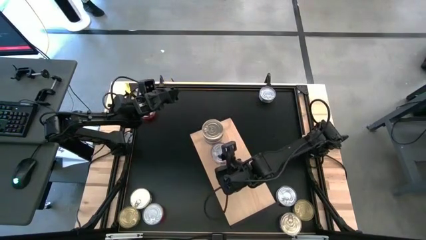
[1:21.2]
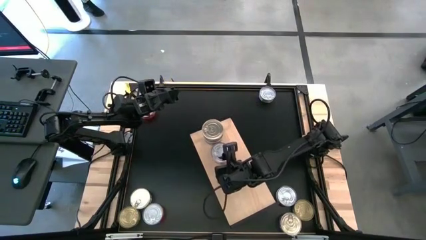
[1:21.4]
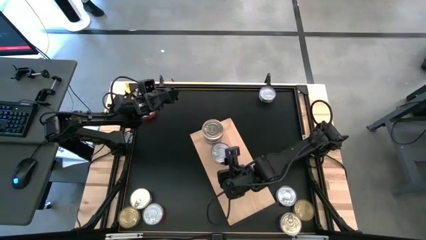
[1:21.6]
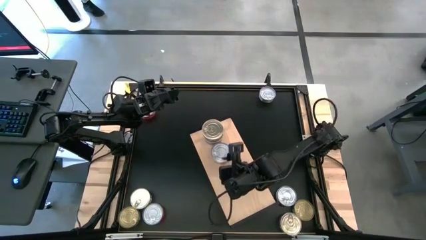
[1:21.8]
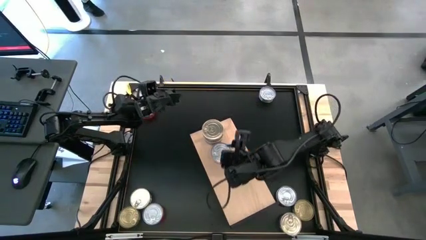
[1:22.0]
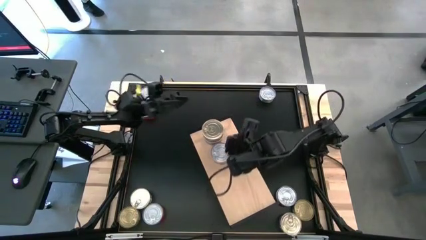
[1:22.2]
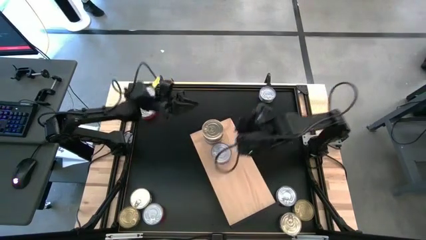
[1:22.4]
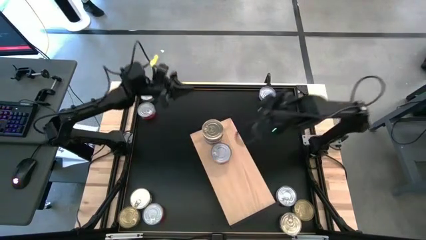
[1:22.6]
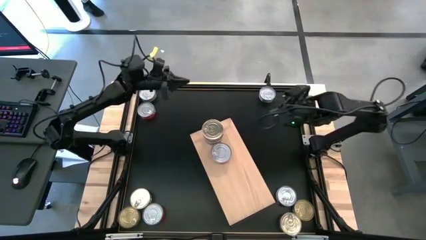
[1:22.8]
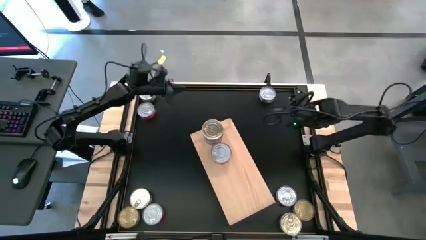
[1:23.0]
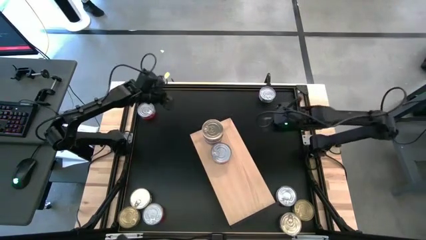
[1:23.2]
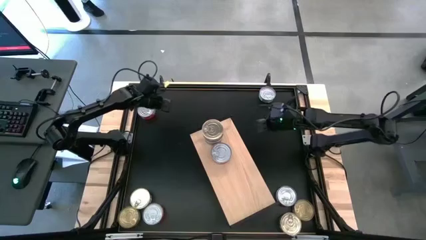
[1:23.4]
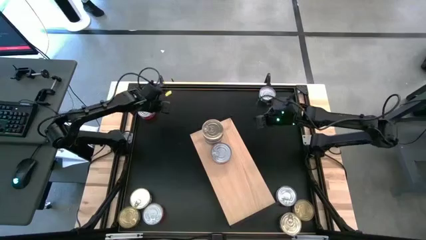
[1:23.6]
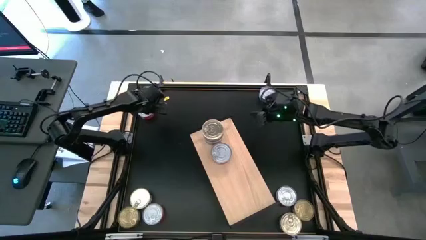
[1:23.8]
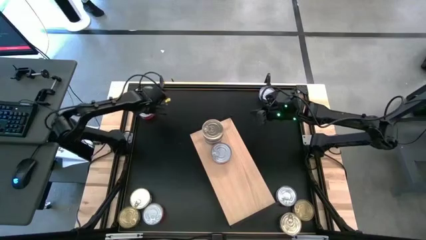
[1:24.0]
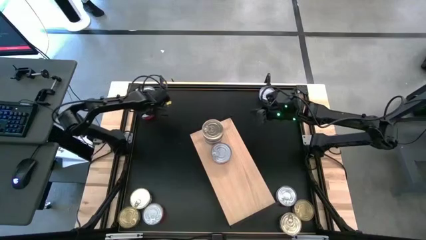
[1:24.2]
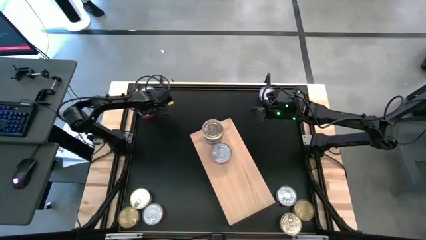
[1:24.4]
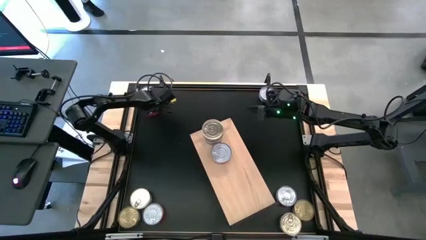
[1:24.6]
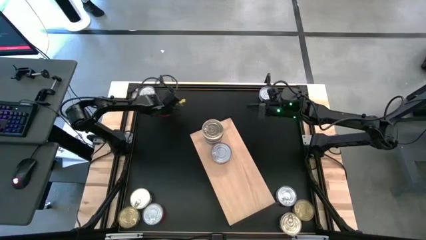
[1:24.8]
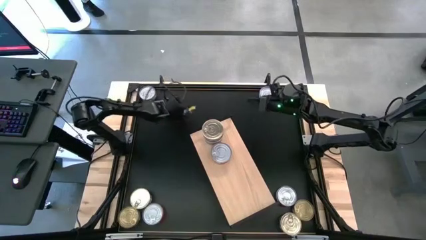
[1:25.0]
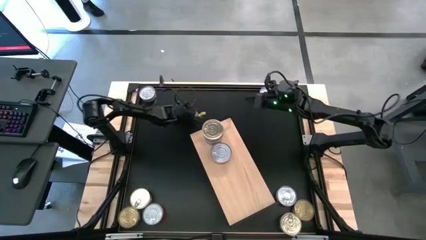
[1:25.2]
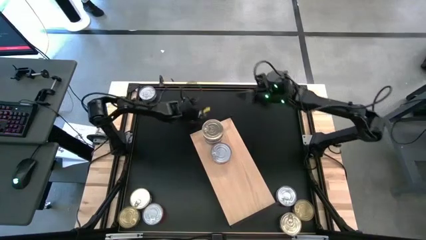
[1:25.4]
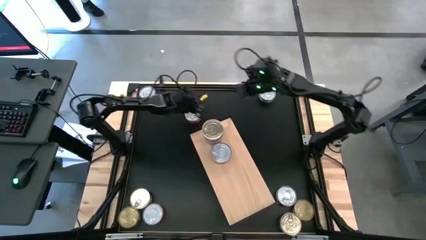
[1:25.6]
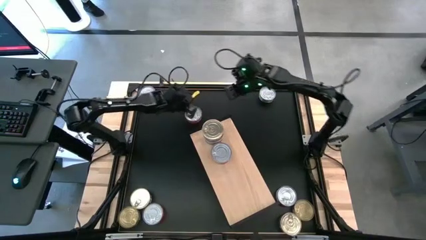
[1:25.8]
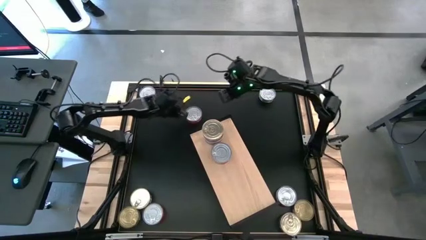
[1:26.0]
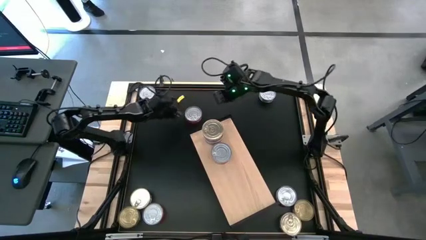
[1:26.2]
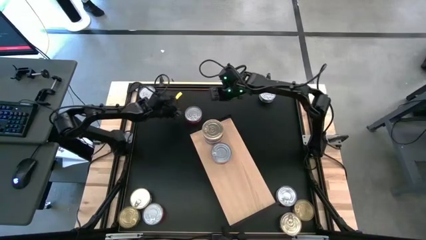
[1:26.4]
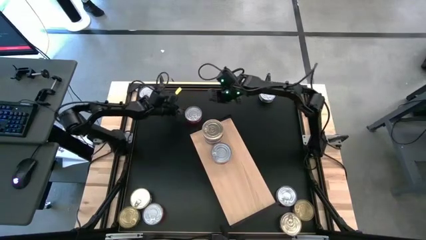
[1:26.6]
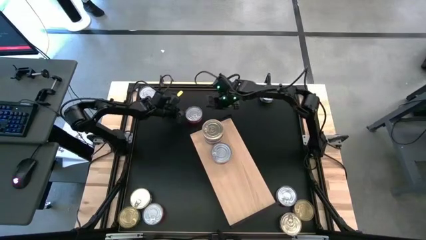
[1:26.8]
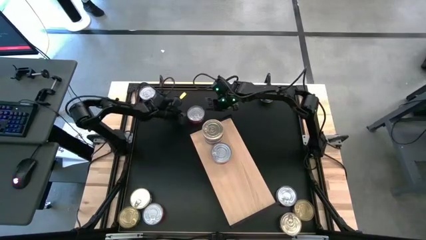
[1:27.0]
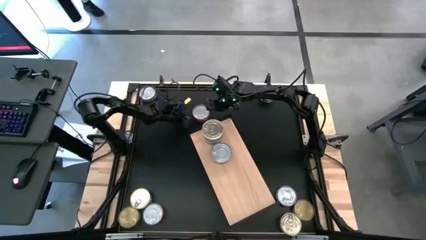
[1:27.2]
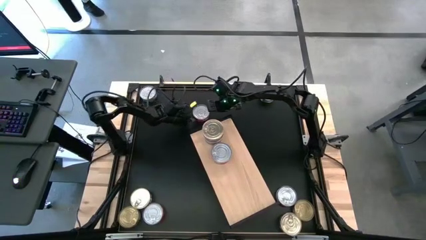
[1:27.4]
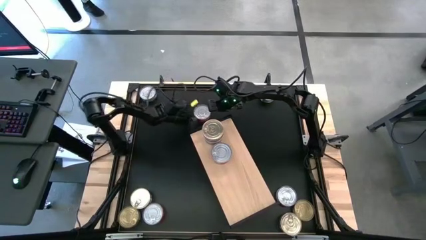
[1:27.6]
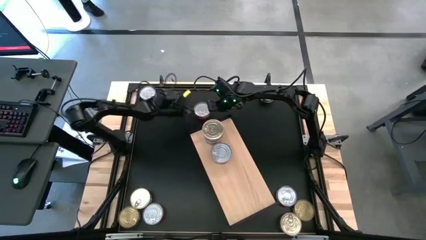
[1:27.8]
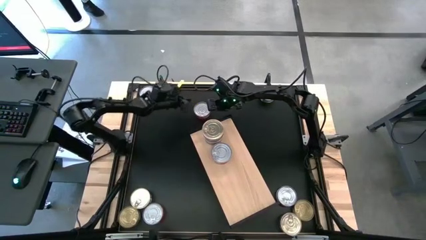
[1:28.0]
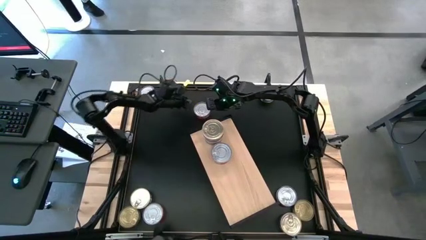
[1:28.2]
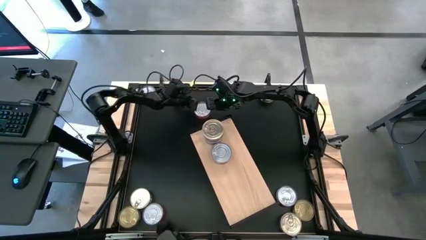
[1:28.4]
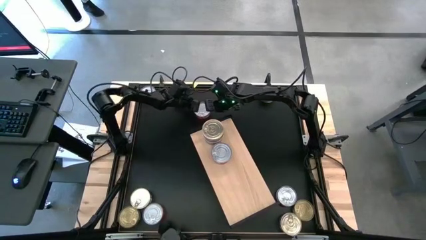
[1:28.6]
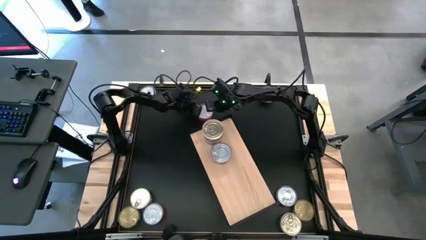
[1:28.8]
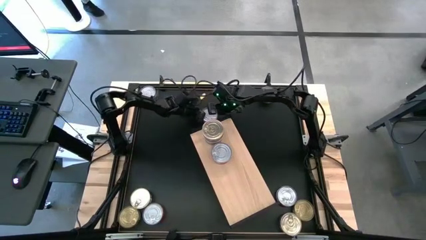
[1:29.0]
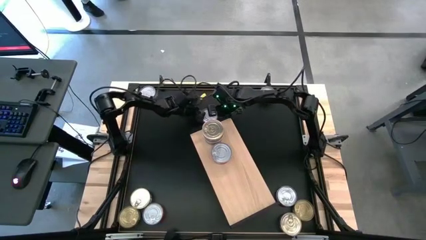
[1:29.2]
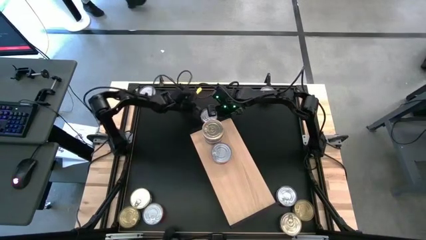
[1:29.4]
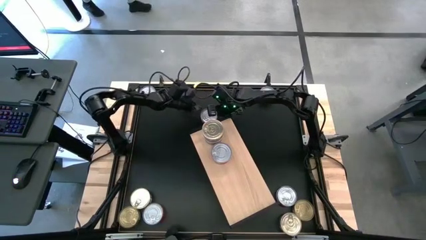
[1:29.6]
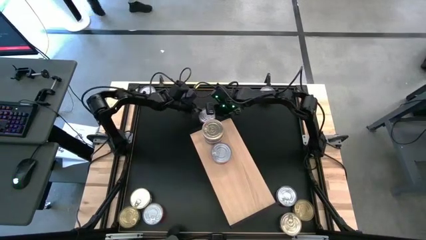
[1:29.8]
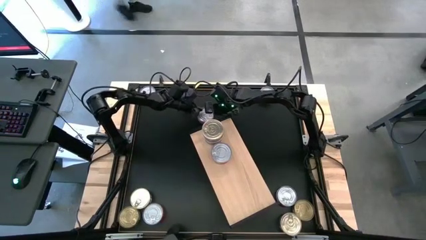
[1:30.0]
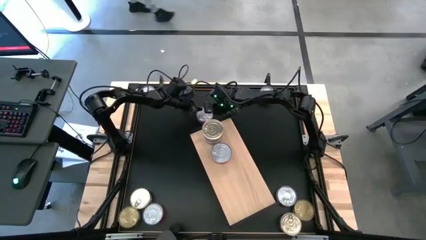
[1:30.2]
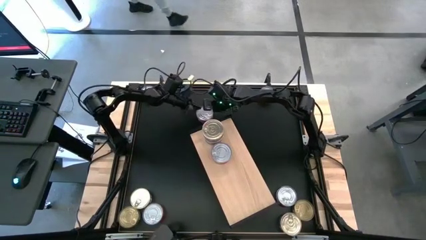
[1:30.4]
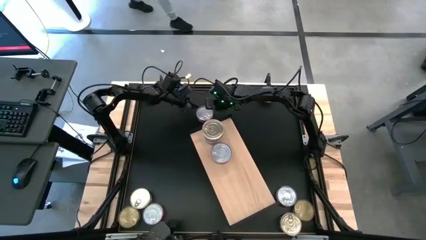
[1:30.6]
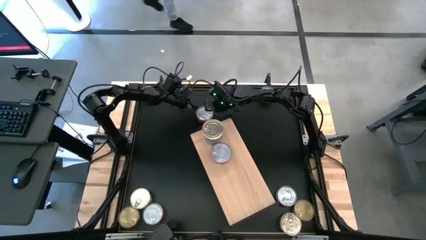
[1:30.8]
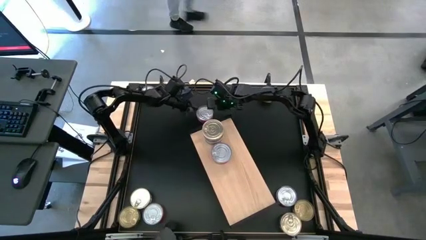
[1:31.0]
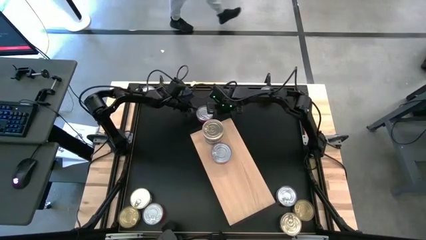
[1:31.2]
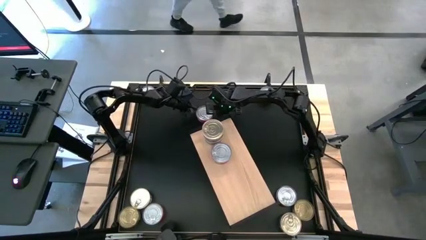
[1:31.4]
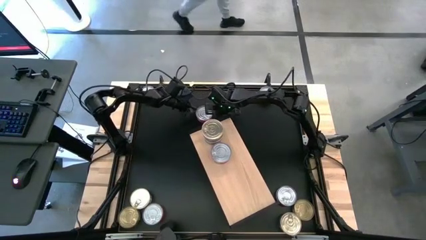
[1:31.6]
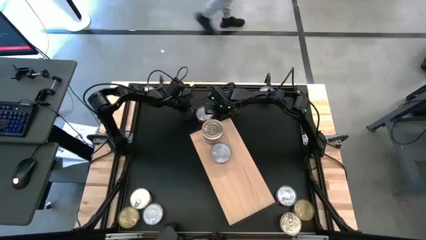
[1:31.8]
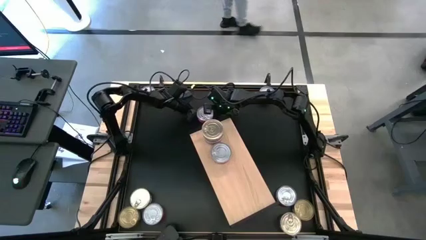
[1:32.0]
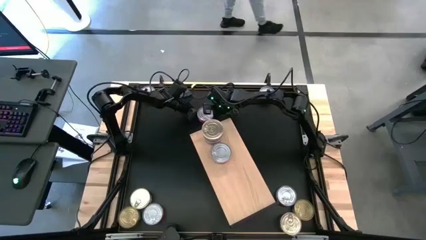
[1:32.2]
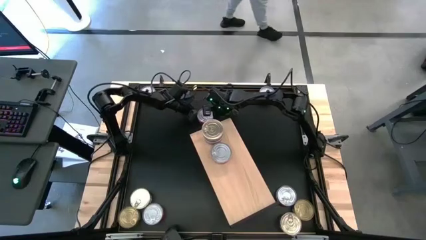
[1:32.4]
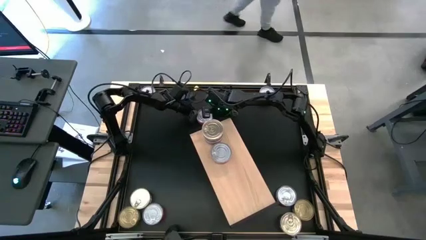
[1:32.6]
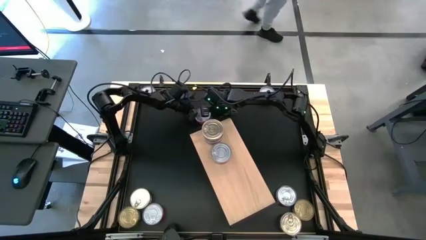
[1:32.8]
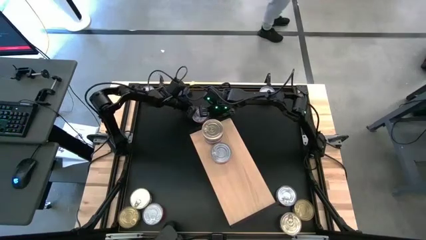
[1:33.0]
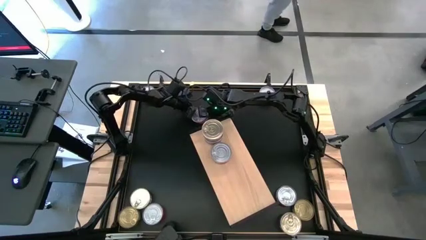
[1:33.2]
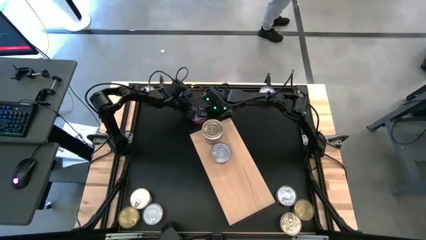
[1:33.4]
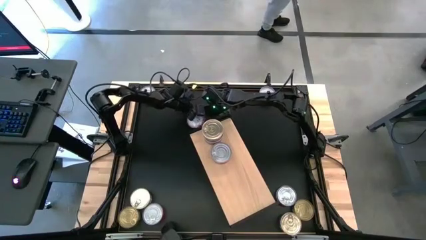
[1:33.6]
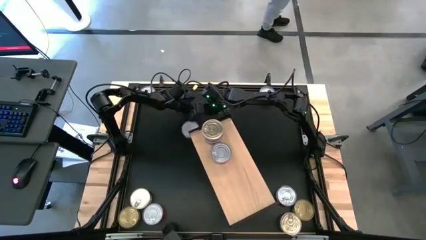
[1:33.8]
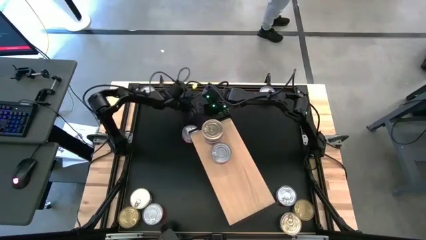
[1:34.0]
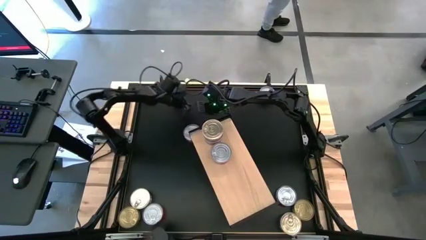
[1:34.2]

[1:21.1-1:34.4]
Task: Stack canned seafood by type on shelf
Stack the red tuna can on top of the red tuna can on the shelf
